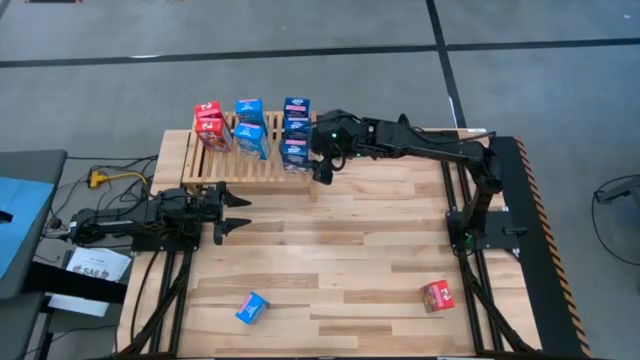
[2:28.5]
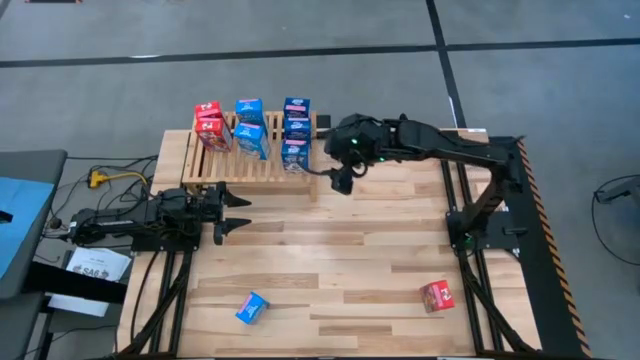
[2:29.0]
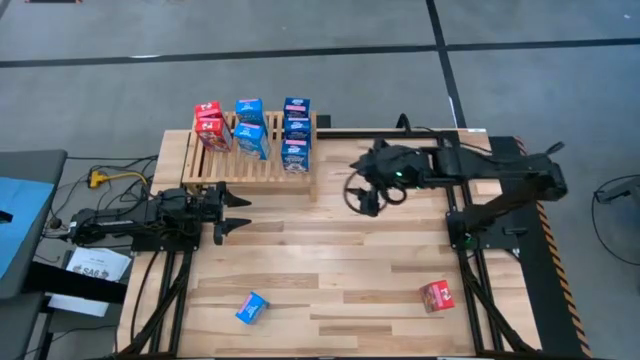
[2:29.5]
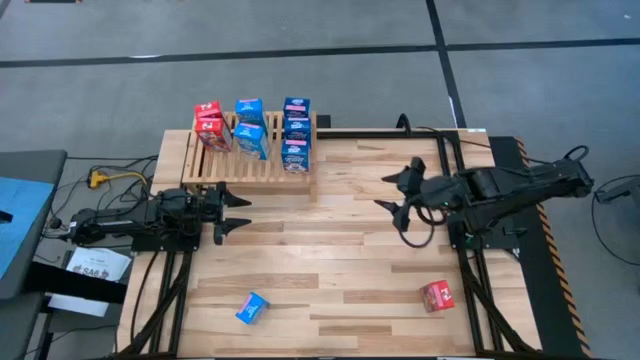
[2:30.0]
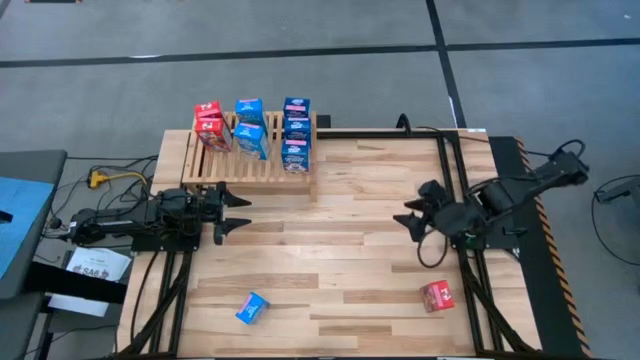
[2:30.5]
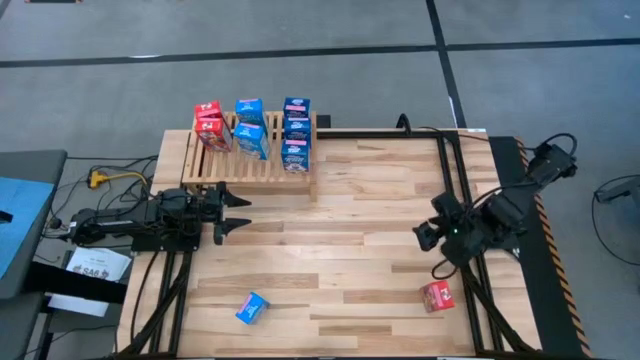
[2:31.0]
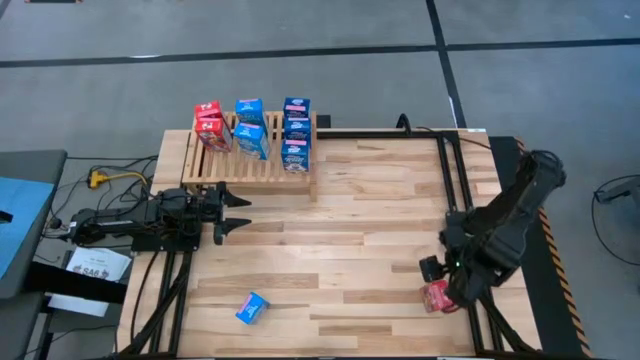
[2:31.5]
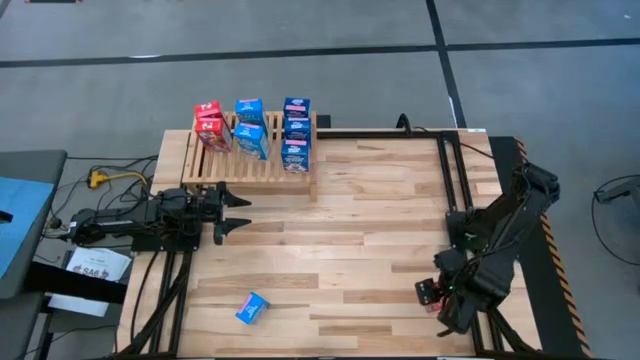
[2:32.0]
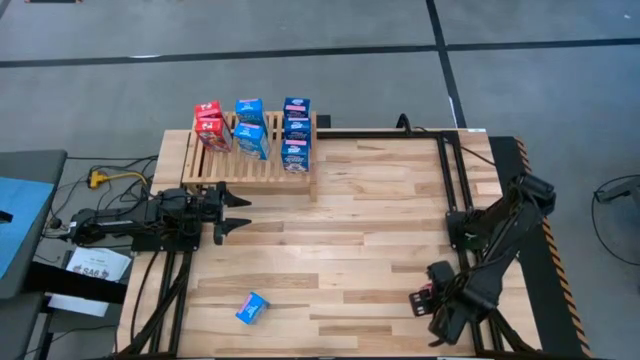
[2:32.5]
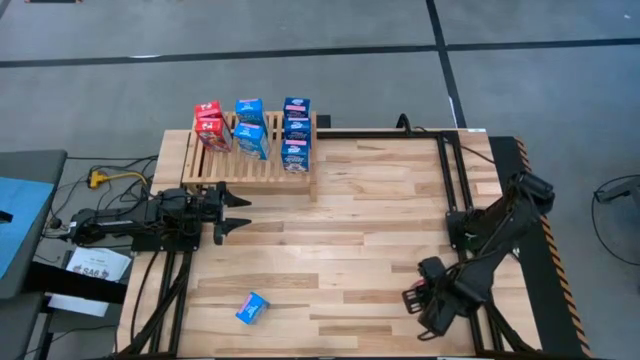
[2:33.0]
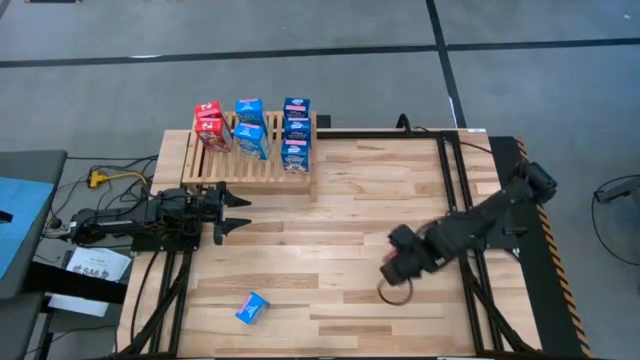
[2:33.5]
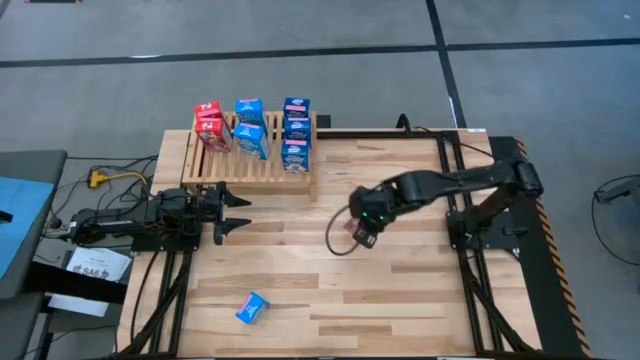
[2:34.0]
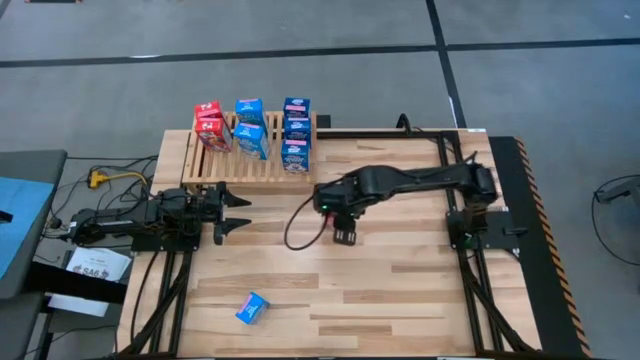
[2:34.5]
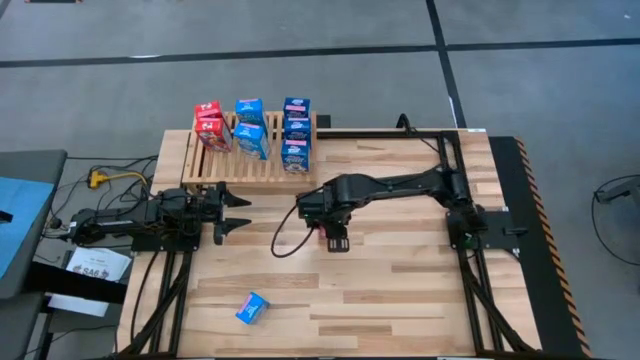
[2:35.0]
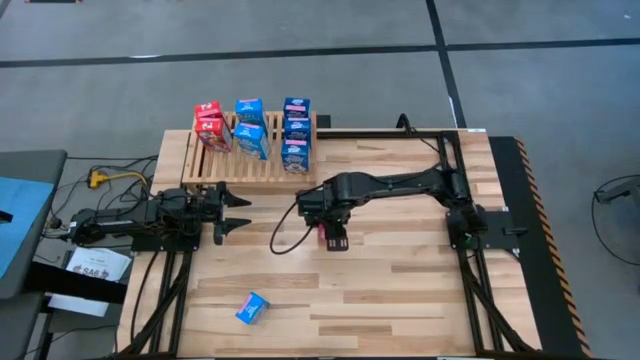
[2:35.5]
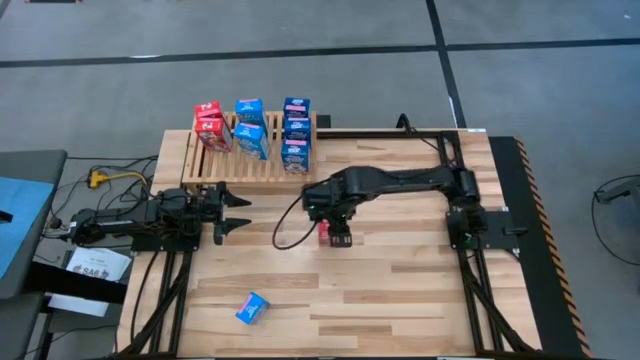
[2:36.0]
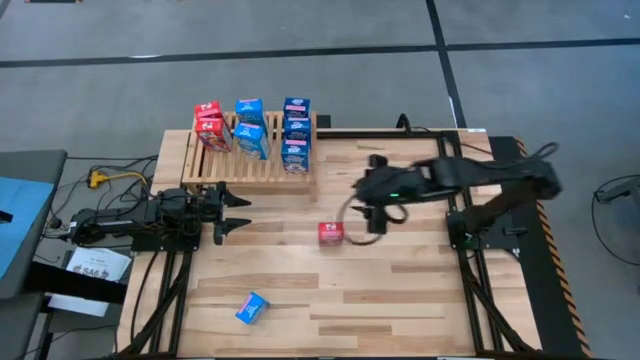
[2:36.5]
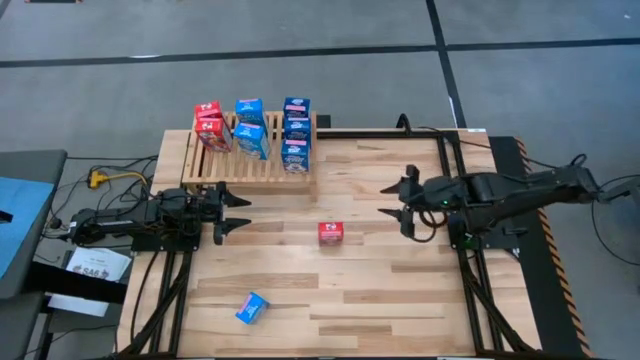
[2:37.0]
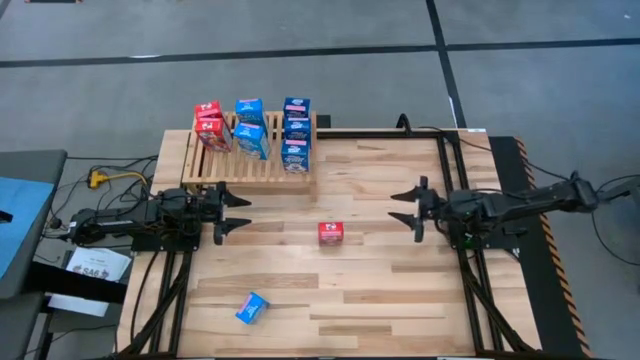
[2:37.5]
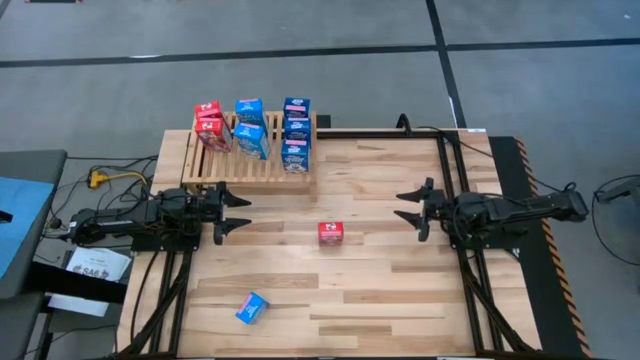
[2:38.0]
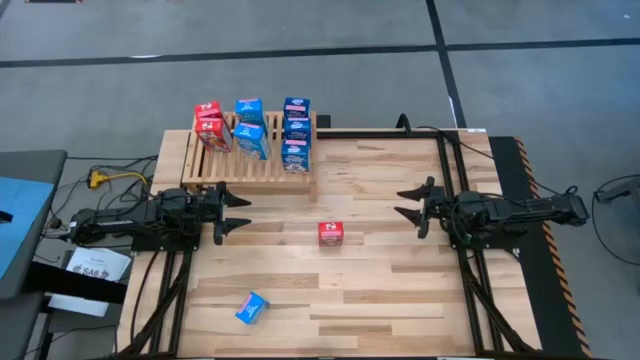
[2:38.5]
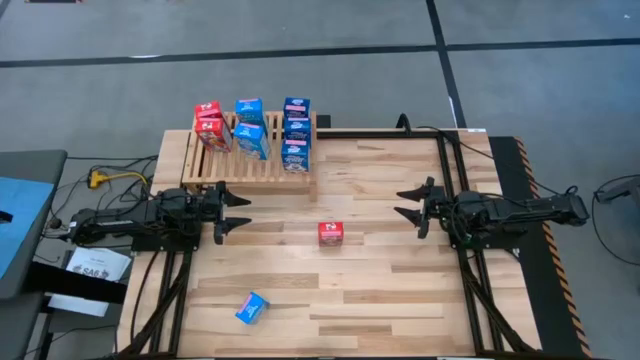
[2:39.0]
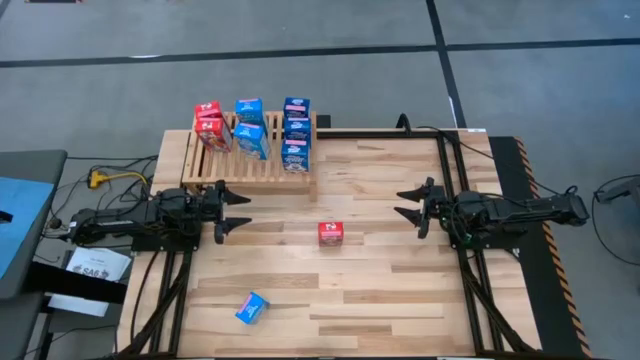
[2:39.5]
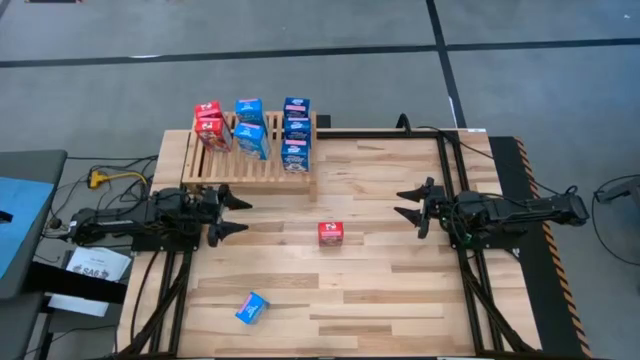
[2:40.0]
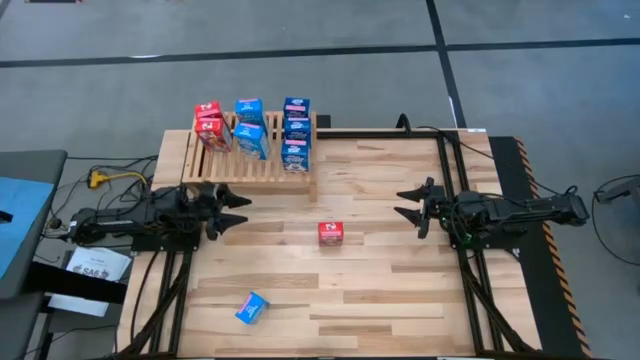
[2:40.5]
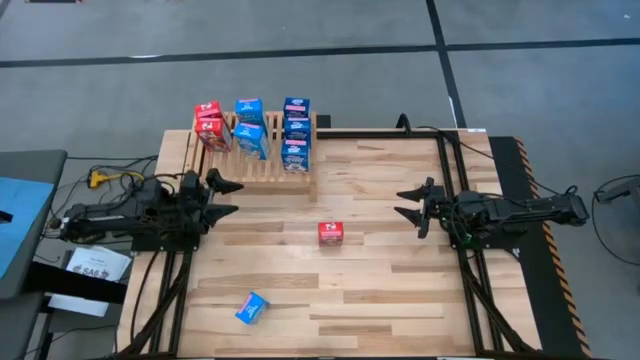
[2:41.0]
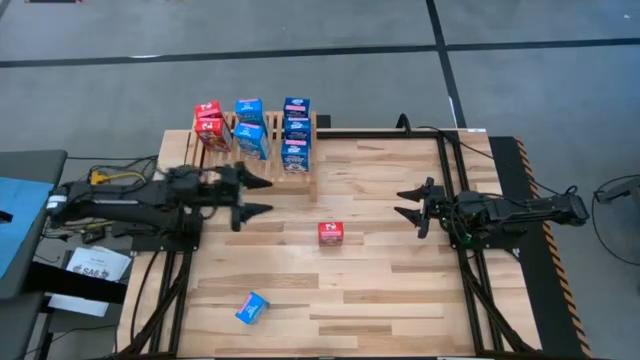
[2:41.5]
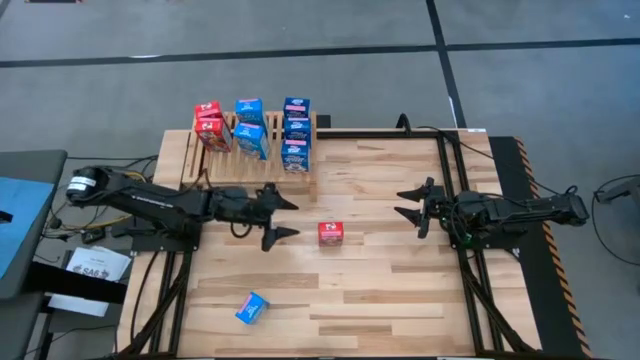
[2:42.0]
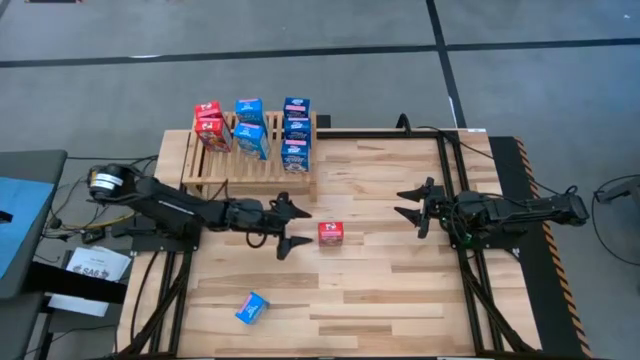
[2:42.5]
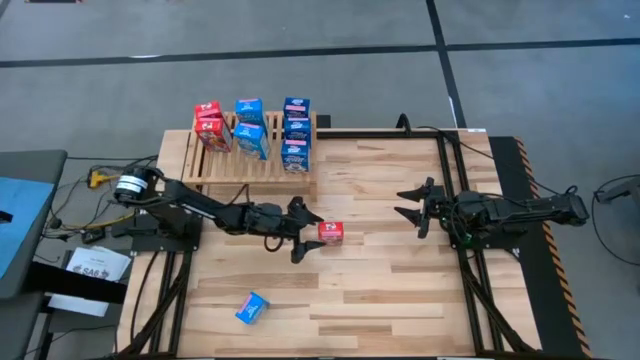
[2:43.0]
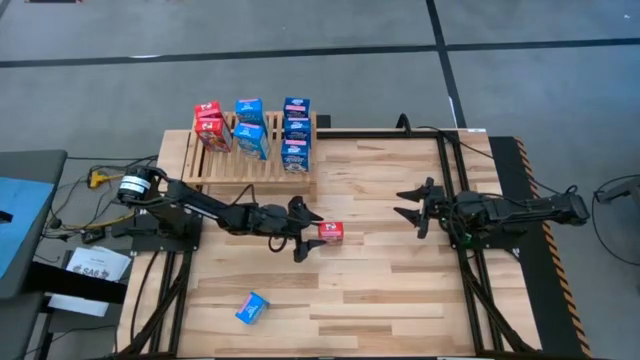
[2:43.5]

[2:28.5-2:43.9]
Task: Stack cereal on shelf
Put the red cereal box the aligned with the other cereal boxes on the shelf
